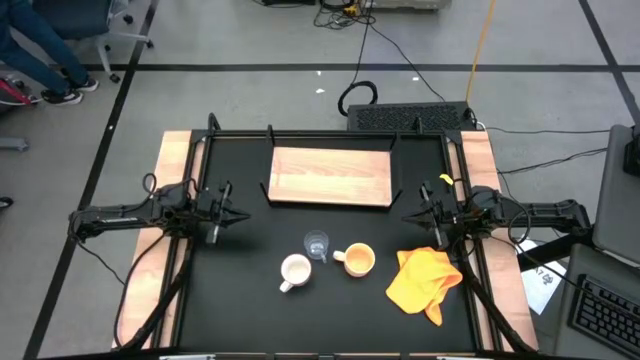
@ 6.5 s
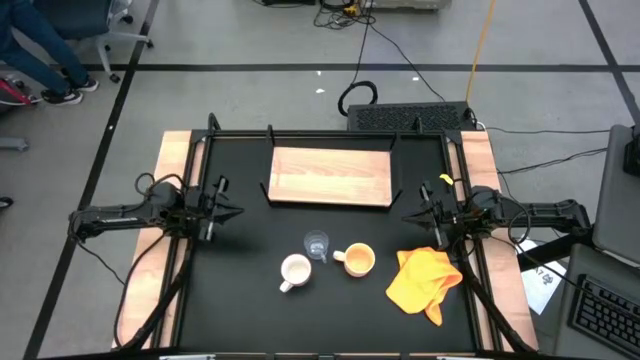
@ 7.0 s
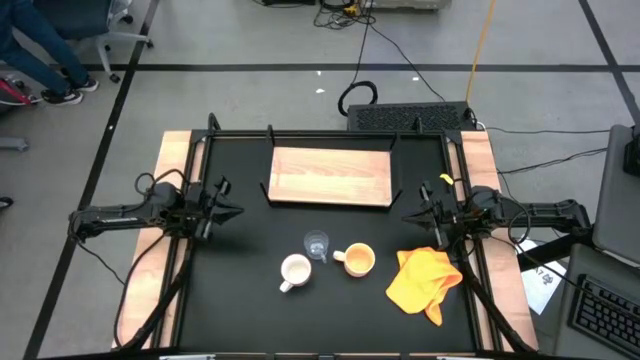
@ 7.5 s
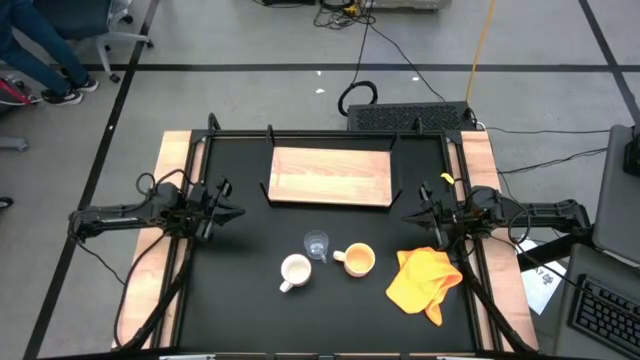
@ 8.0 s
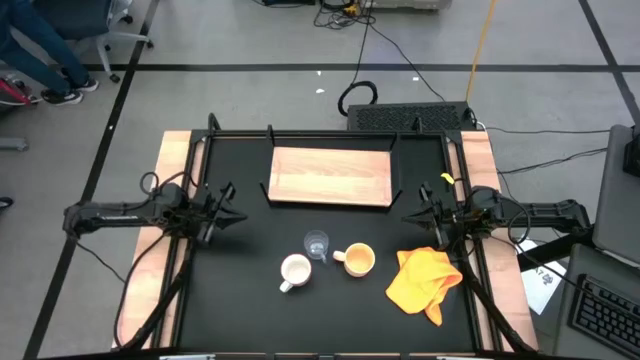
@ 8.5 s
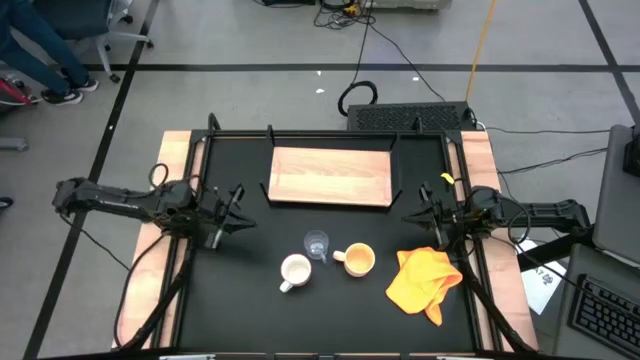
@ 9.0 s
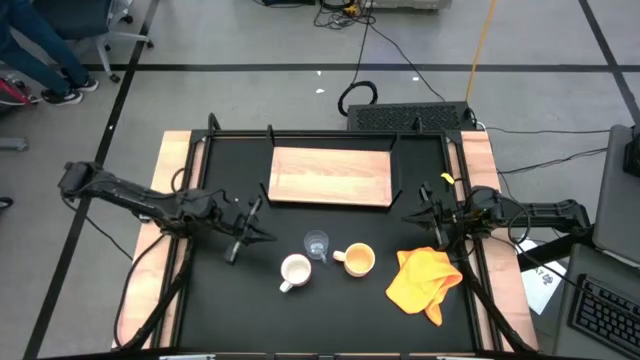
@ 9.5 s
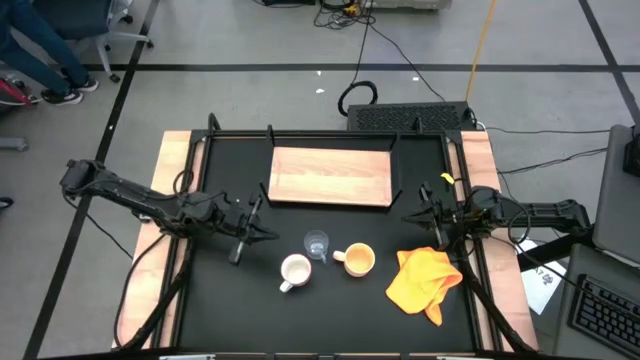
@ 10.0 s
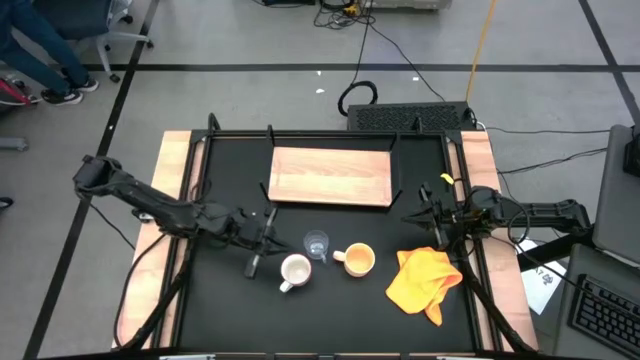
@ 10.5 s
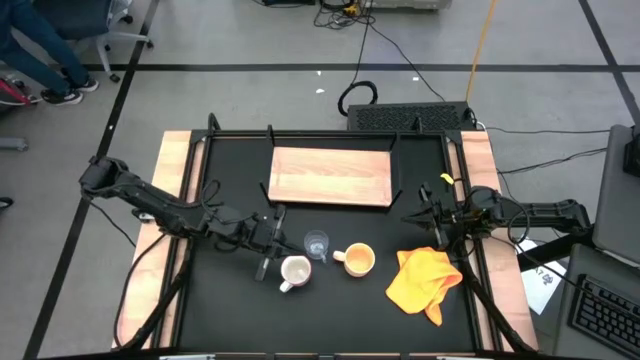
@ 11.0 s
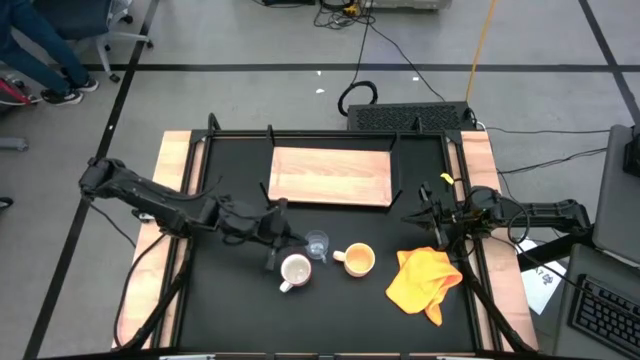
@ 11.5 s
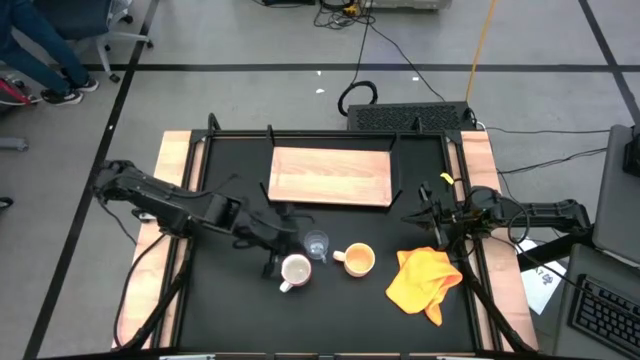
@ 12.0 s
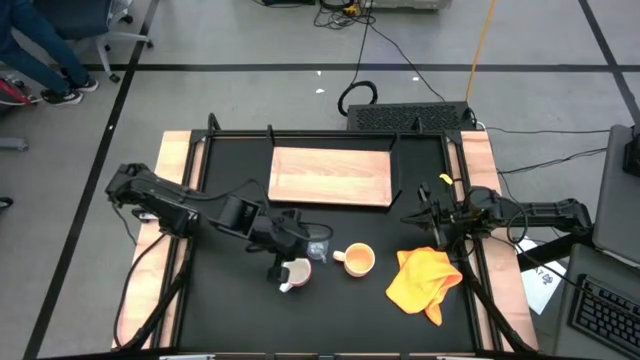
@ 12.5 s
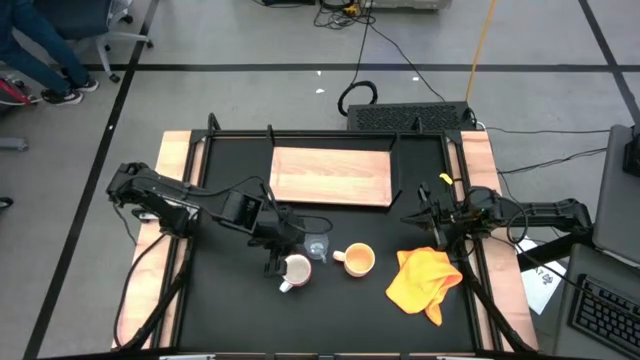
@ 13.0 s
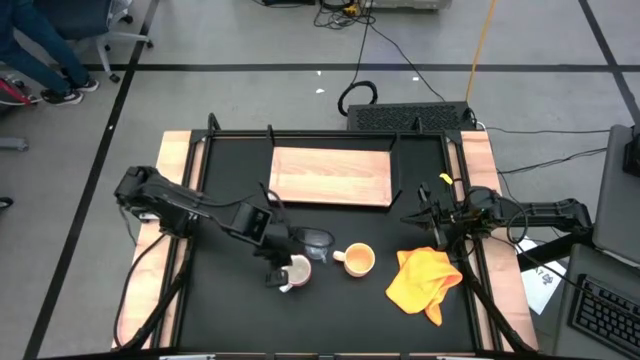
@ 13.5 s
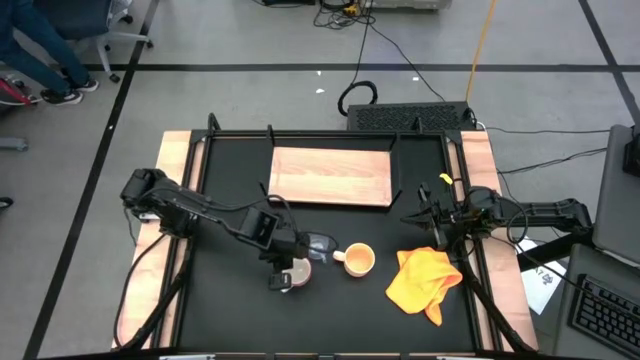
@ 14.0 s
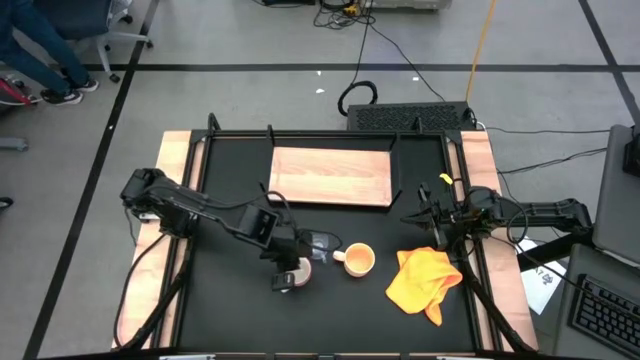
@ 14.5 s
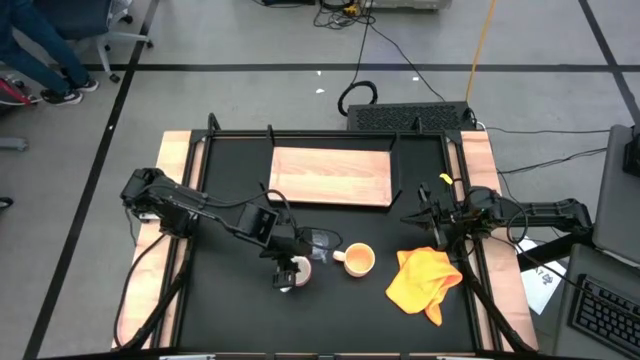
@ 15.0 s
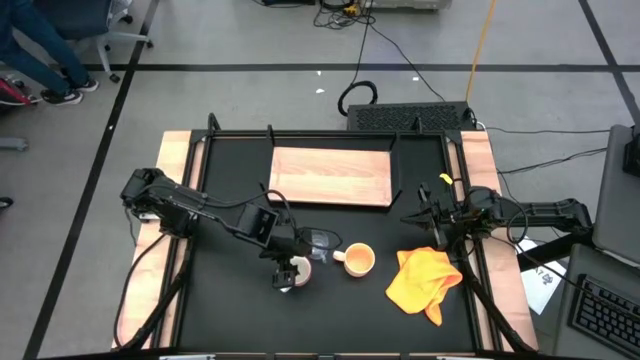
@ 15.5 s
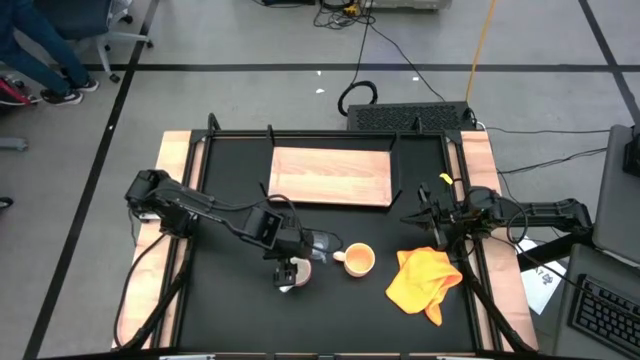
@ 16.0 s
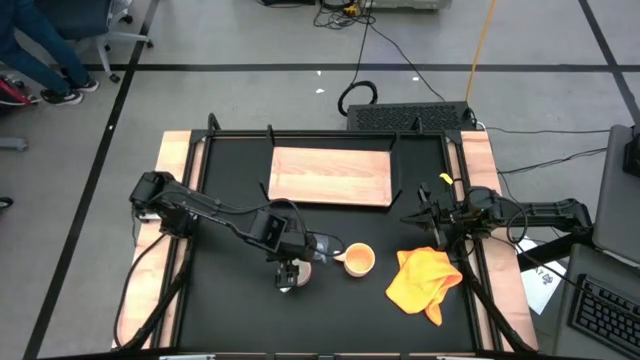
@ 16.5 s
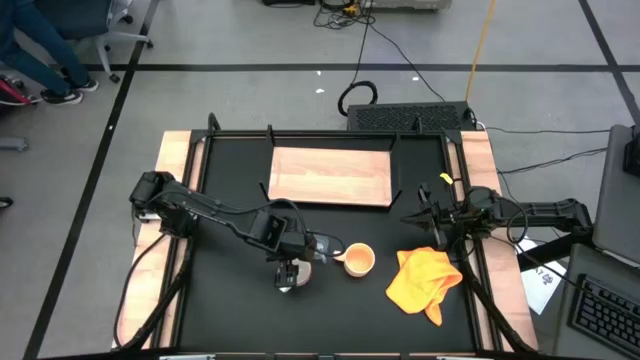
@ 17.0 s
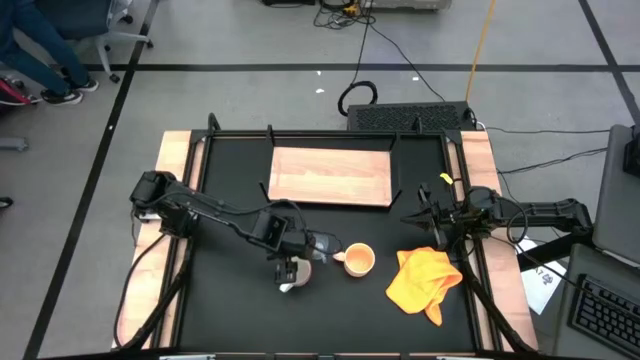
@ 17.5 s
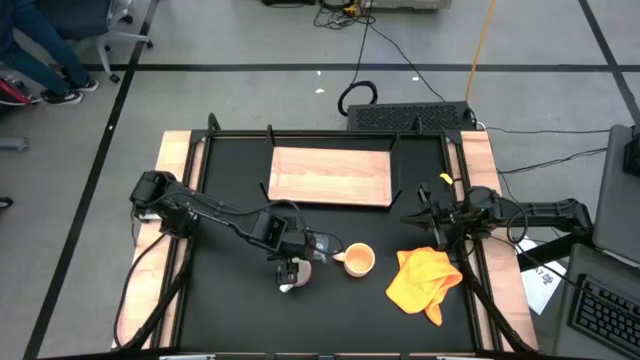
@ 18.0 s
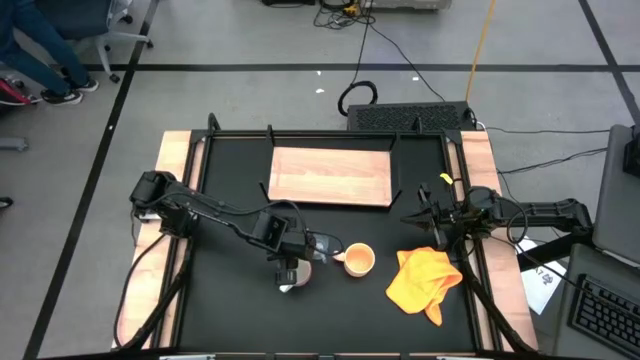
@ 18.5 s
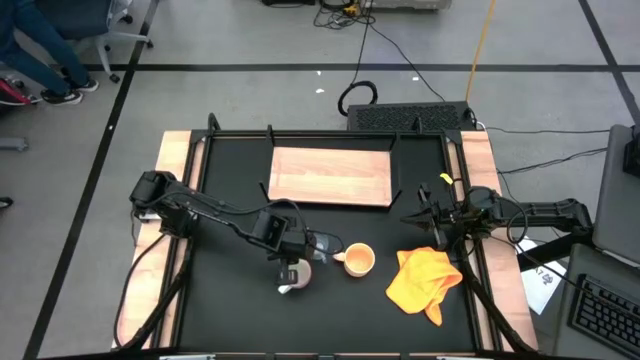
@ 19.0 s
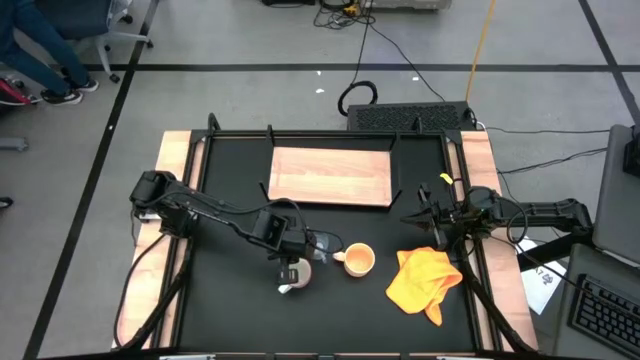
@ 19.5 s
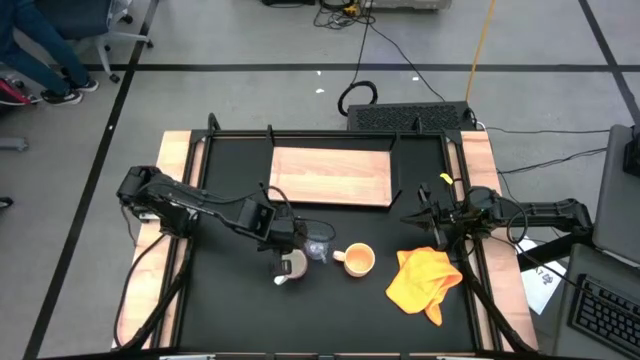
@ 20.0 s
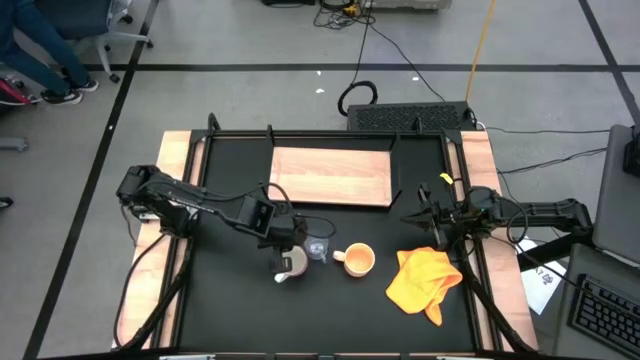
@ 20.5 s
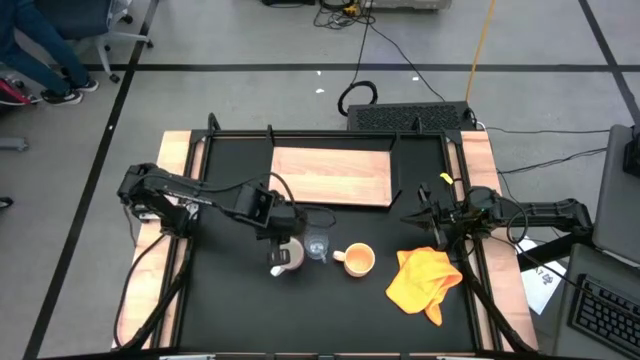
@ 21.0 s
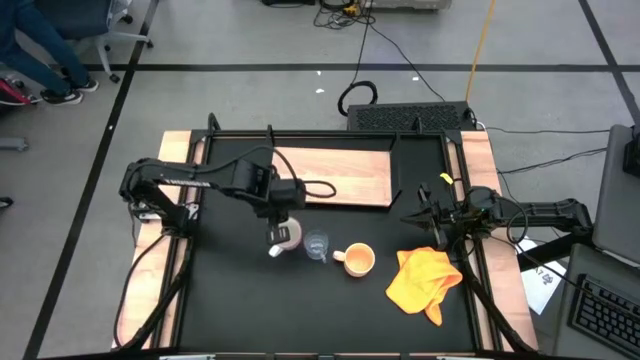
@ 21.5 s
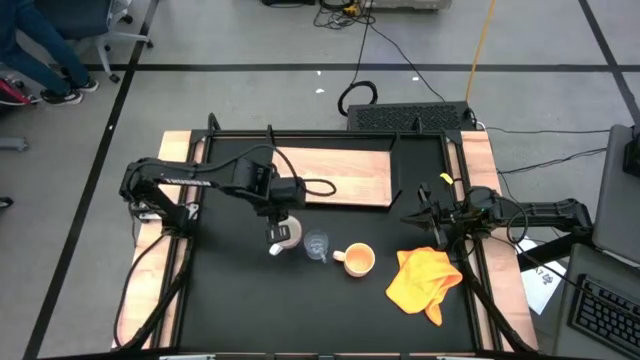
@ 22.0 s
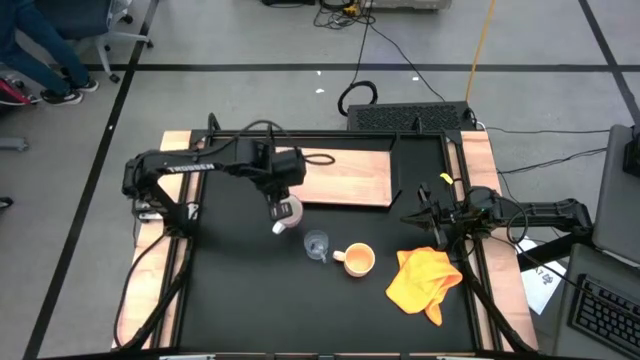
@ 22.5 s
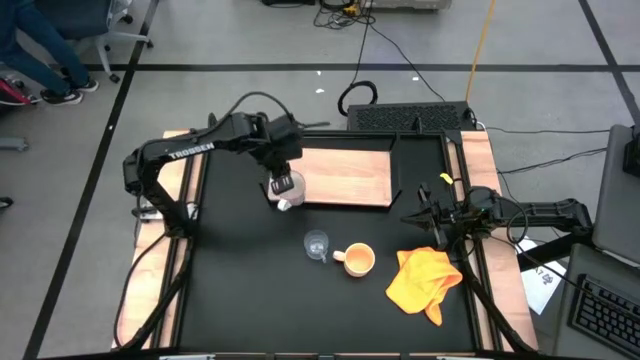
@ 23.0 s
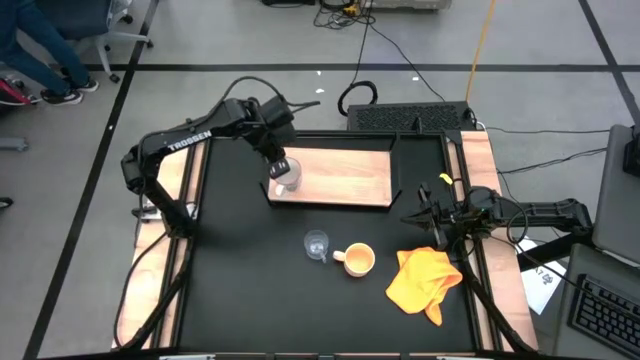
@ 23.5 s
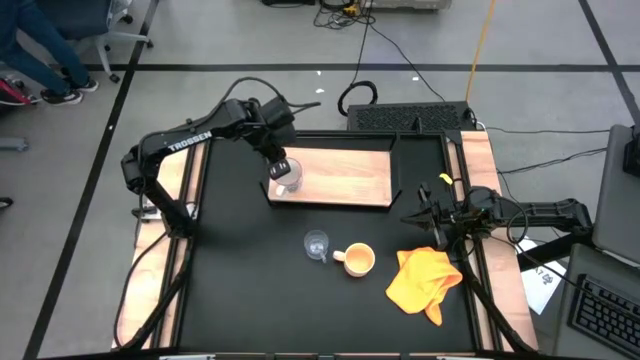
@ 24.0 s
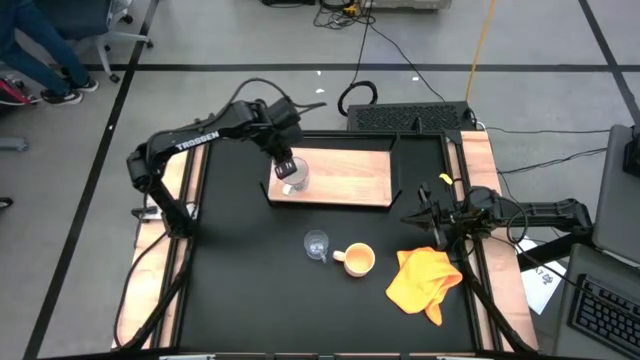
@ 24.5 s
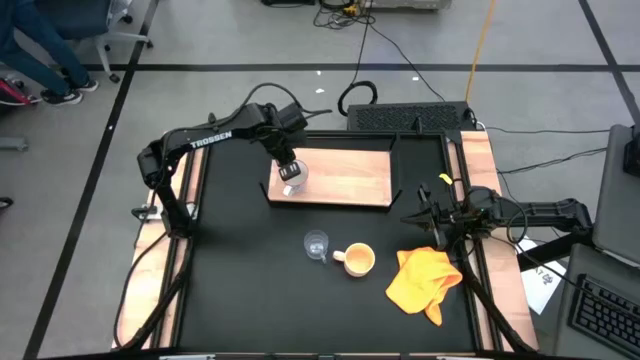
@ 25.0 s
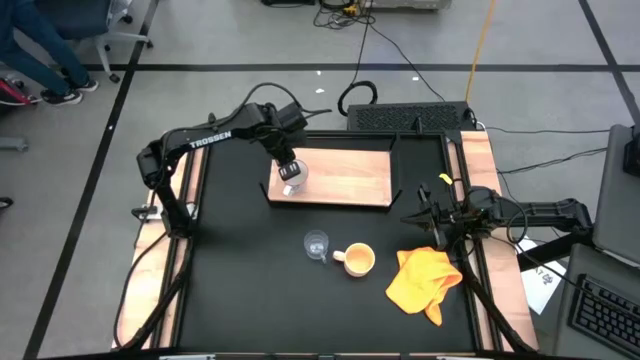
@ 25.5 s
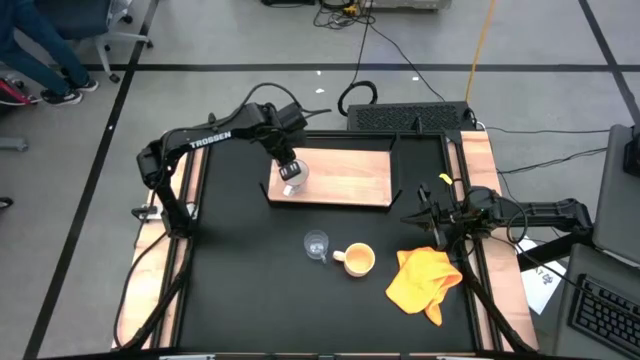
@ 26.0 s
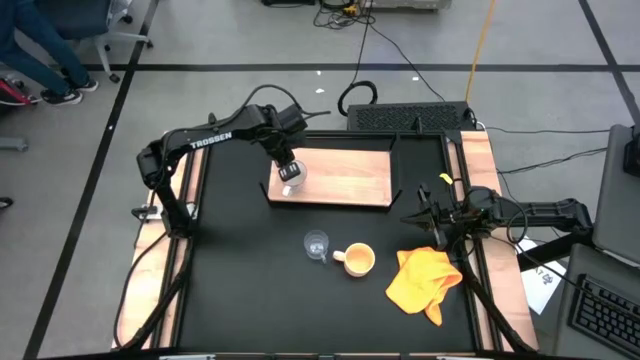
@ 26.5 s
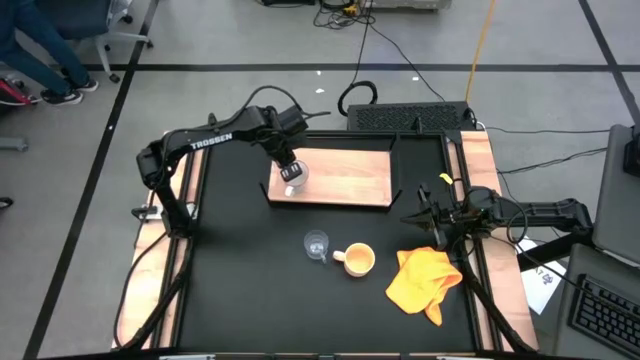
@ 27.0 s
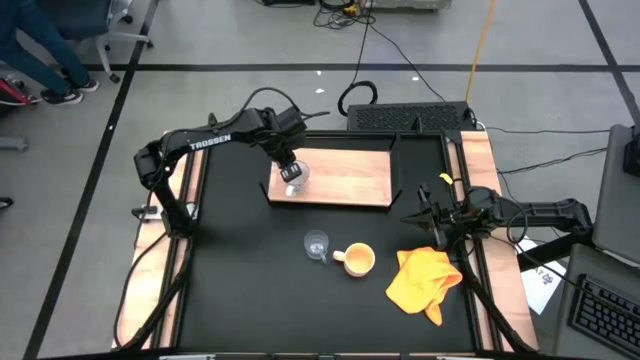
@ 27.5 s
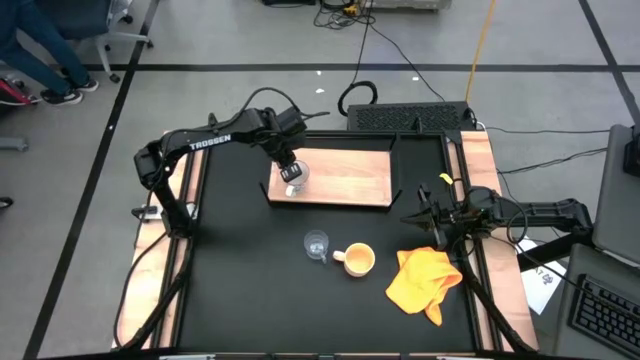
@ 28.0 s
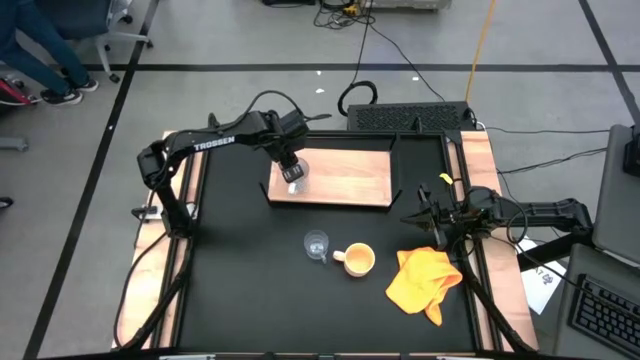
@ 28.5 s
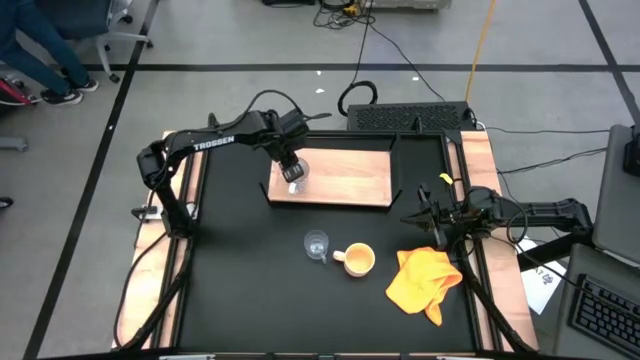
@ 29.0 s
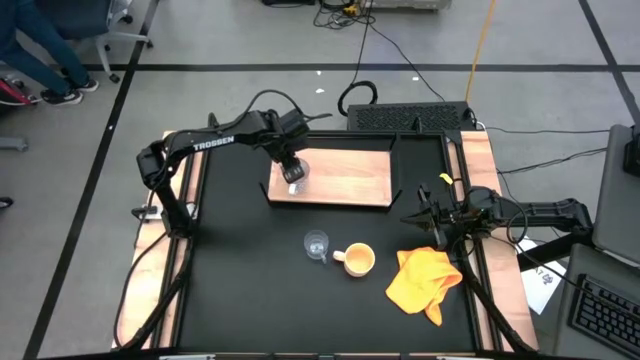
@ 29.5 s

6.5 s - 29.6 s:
Task: Stack small to large cups/mugs on shelf
Put the gray patterned mug on the shelf
